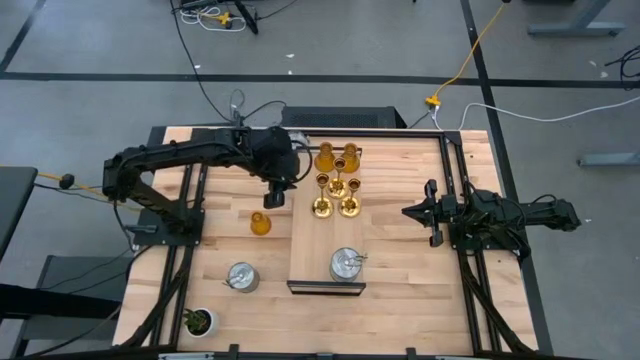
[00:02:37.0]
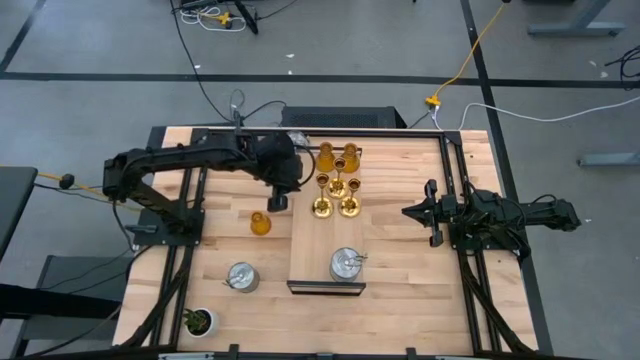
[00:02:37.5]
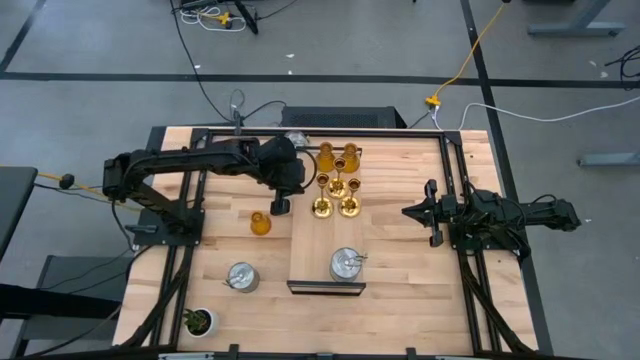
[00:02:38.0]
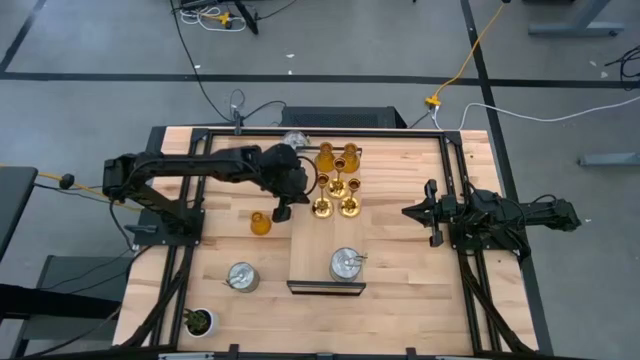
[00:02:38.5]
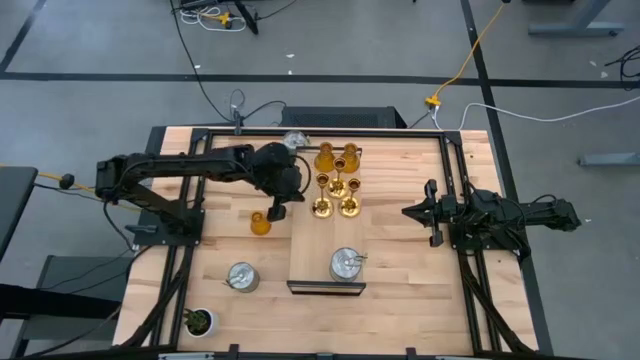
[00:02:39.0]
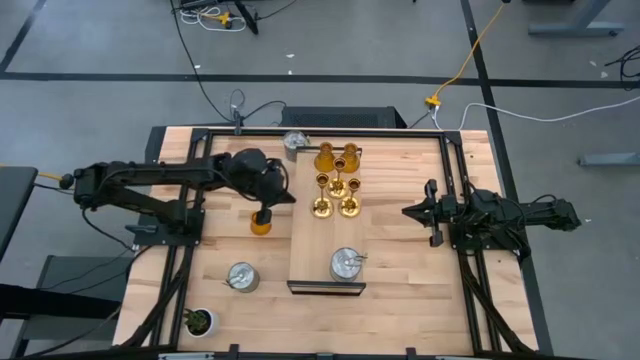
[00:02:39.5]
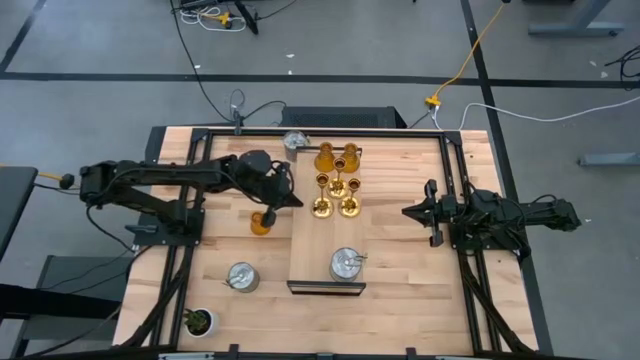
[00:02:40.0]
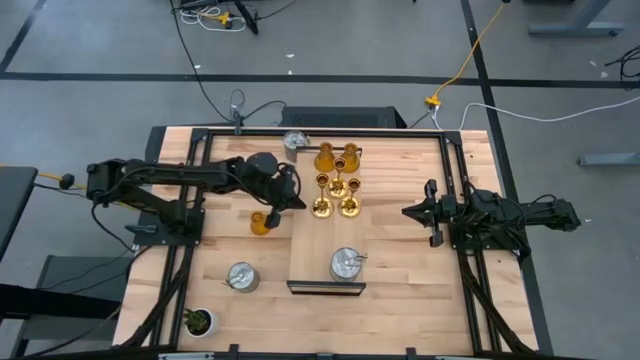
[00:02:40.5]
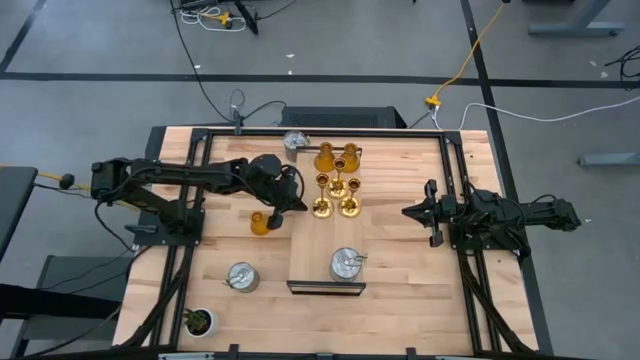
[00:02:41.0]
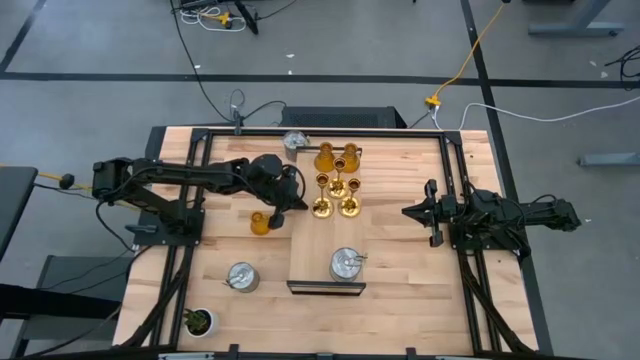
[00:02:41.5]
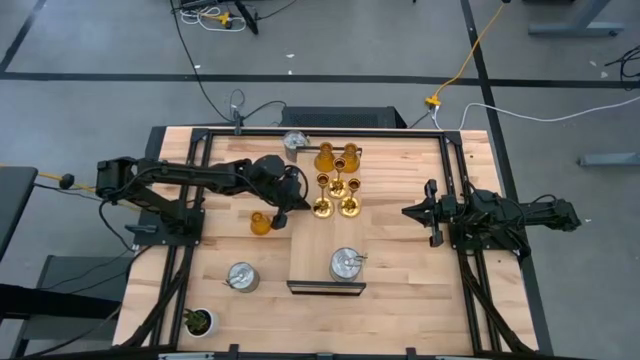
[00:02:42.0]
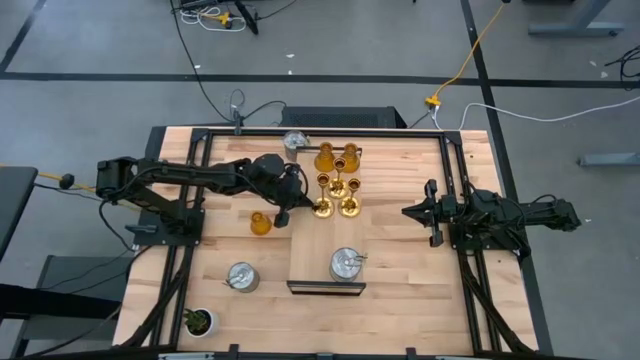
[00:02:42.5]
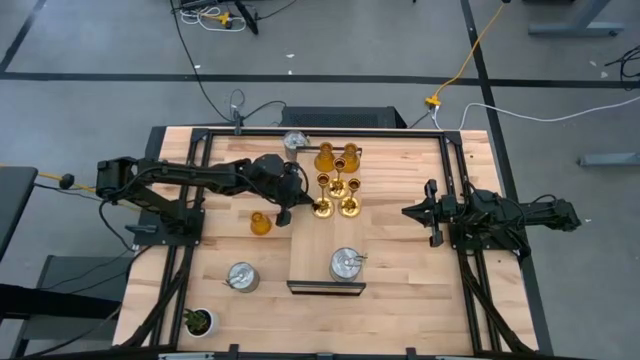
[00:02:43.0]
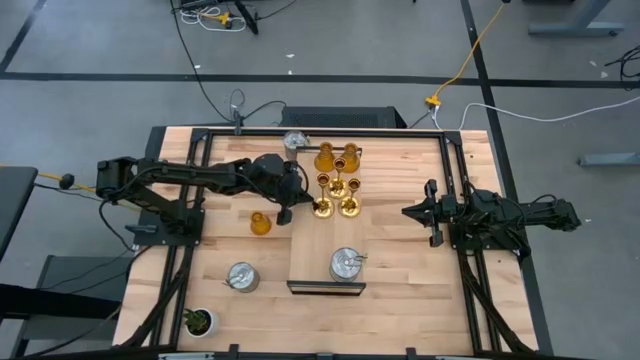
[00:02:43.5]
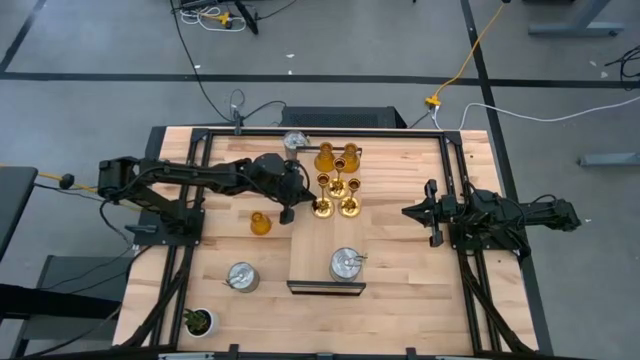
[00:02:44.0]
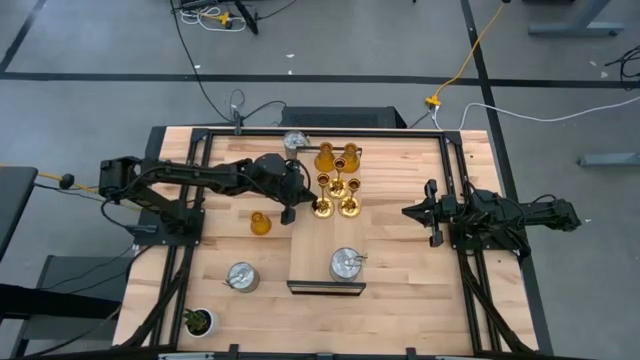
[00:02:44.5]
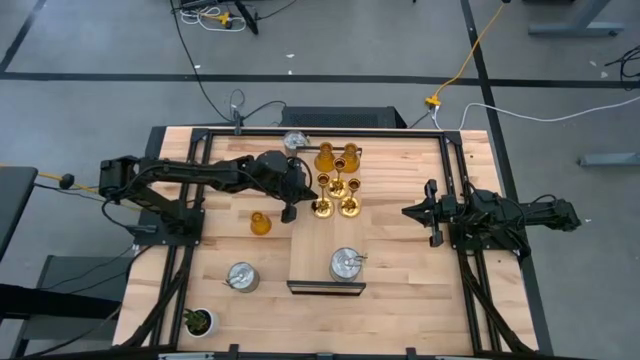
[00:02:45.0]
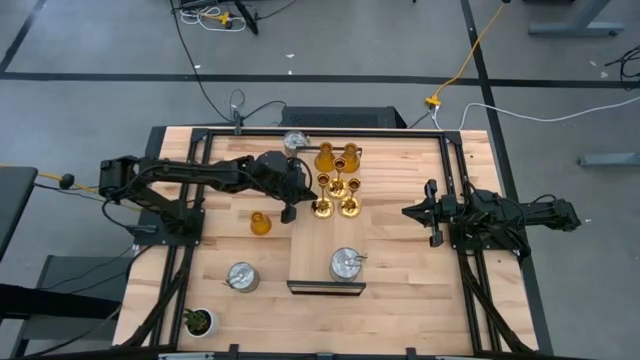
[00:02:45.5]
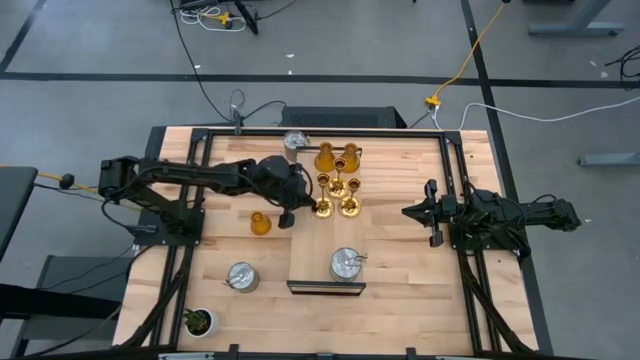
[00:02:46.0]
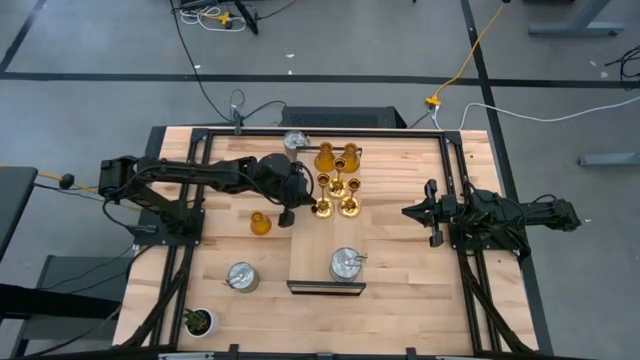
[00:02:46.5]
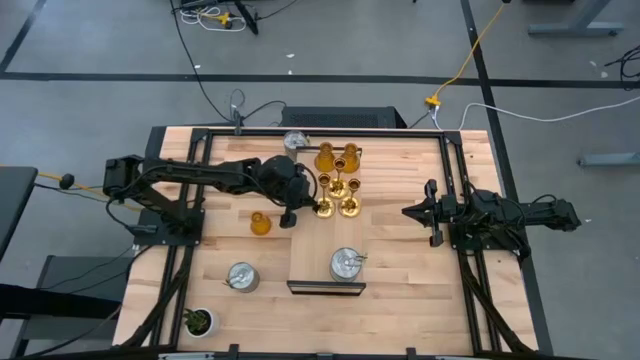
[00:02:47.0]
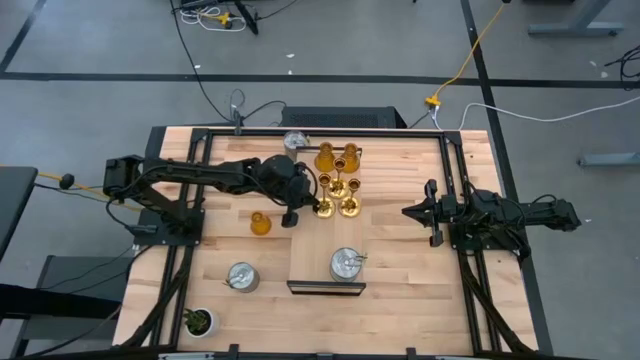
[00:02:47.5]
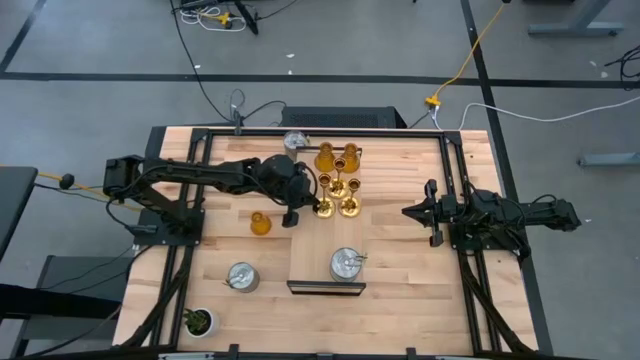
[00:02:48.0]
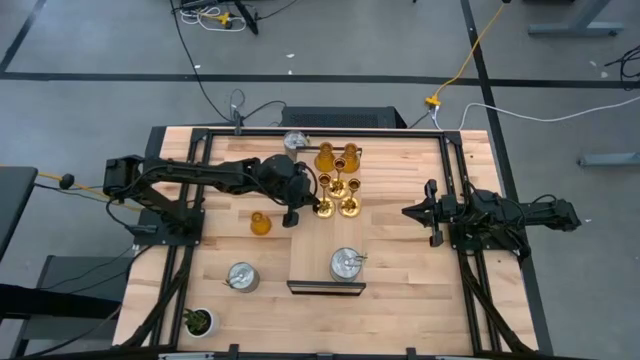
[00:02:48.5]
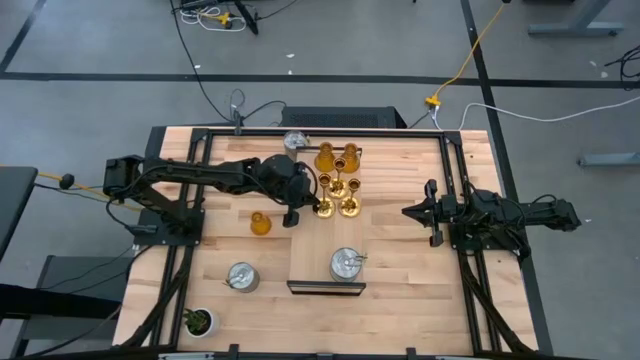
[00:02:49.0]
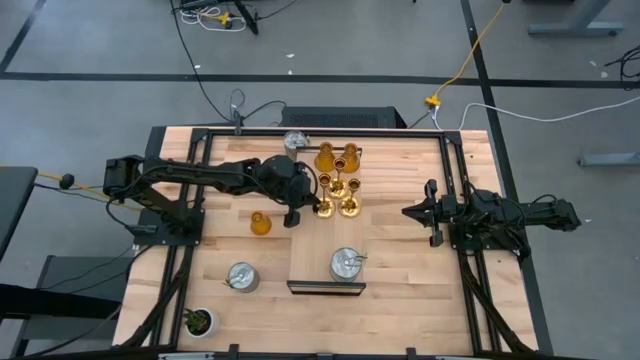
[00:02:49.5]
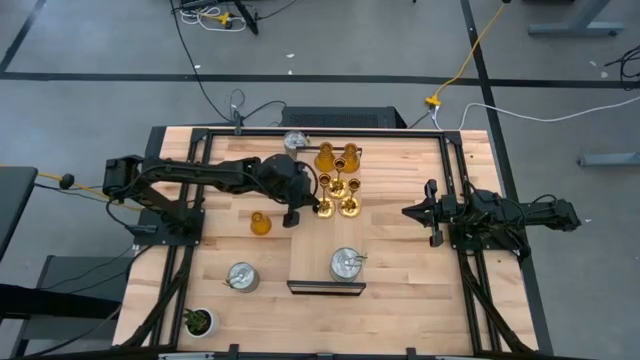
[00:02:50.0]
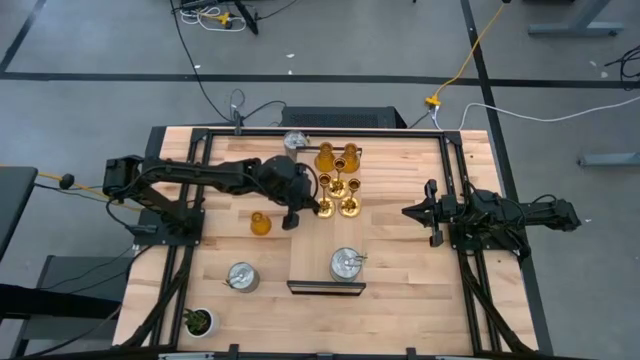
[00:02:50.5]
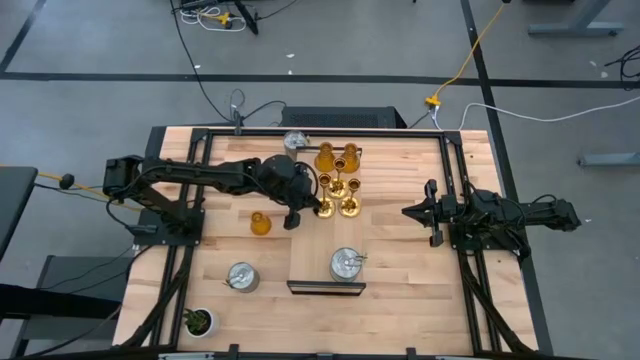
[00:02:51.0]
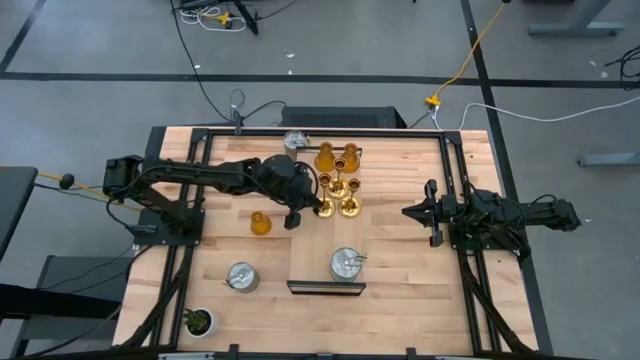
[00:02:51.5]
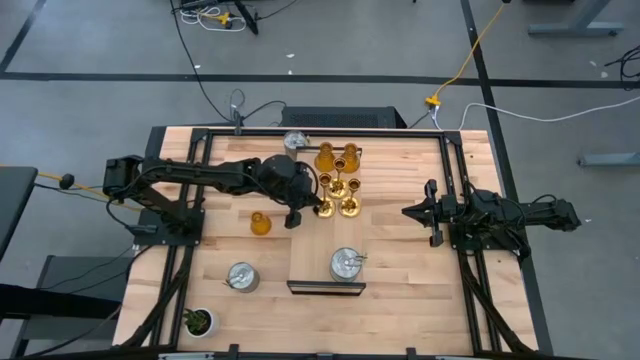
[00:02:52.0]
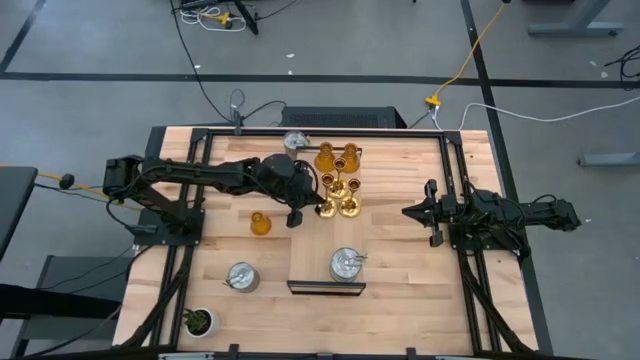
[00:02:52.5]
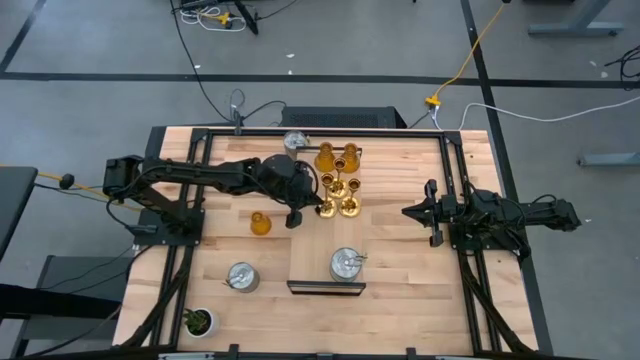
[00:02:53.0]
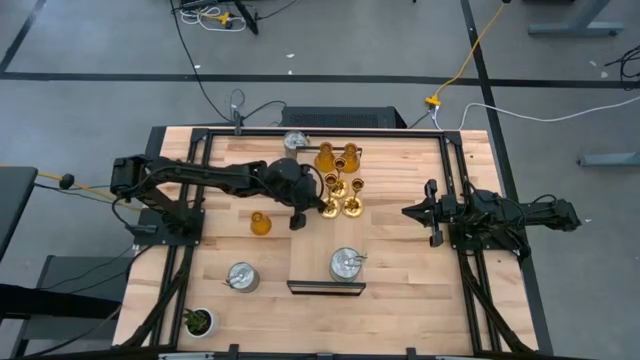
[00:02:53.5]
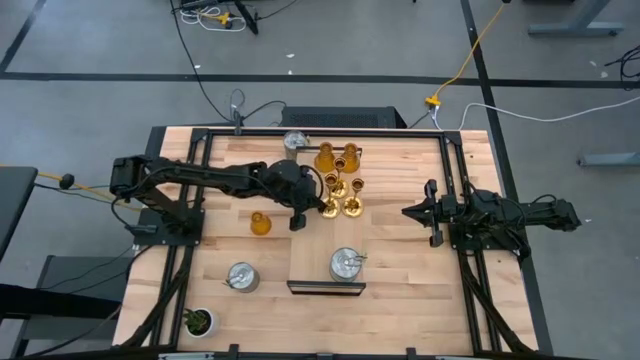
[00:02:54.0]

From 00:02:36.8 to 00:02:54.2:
Task: Pick & Place candle stick holders
Put the candle holder on the shelf aligned with the other candle holder
